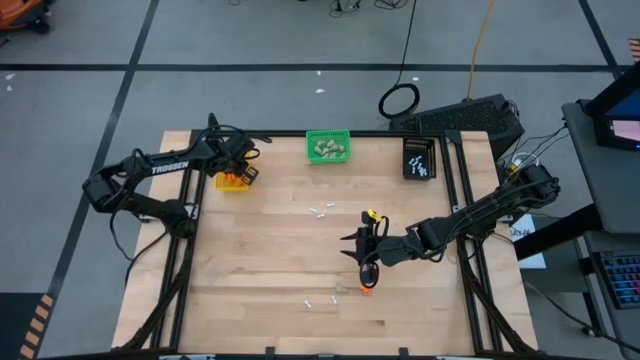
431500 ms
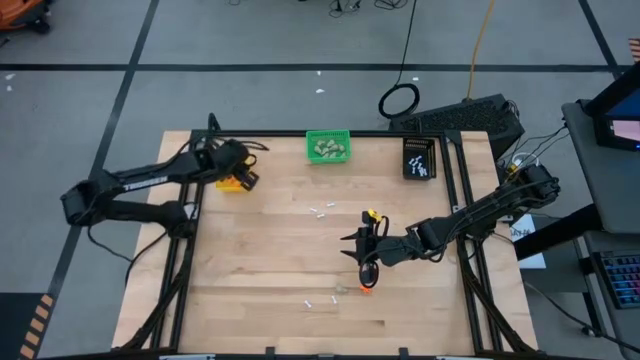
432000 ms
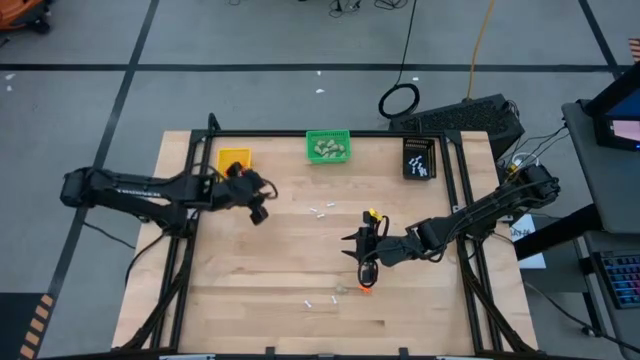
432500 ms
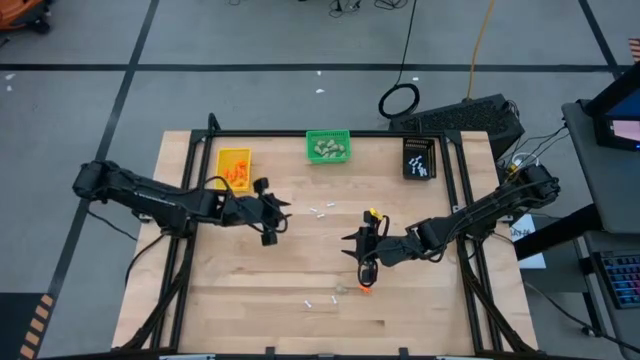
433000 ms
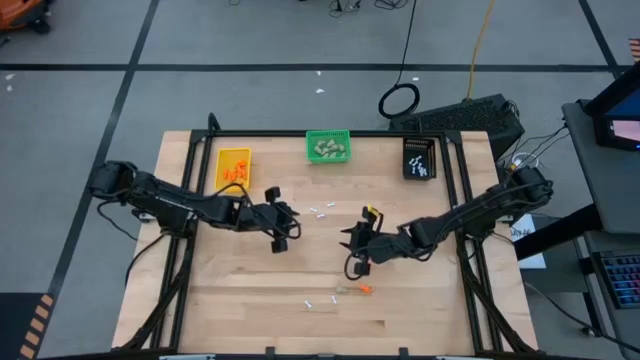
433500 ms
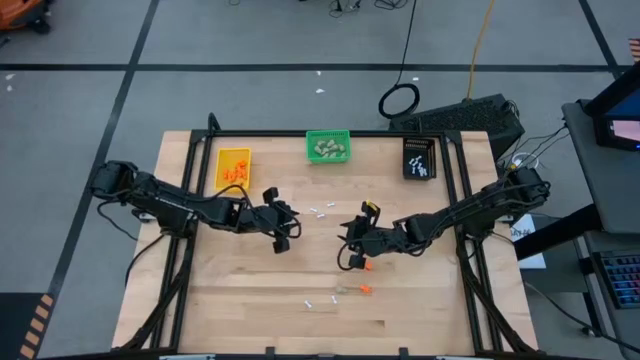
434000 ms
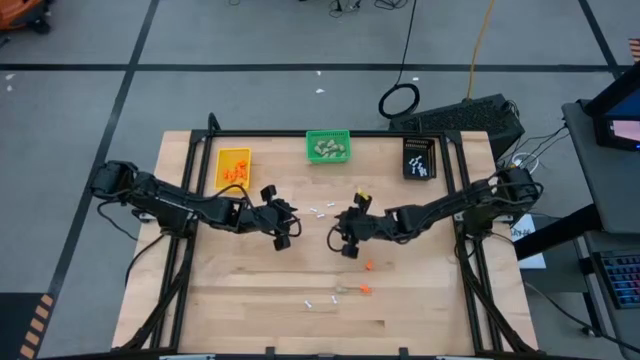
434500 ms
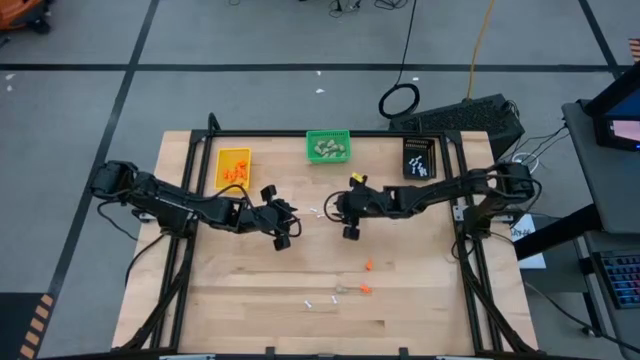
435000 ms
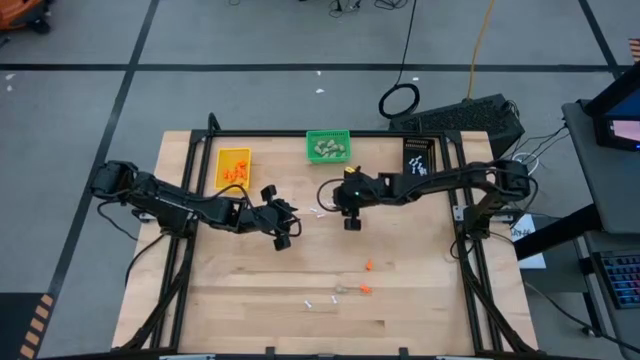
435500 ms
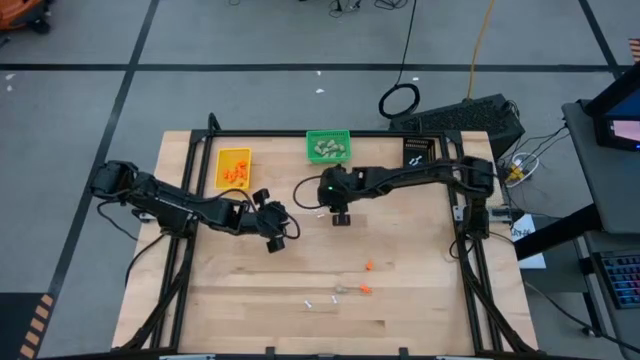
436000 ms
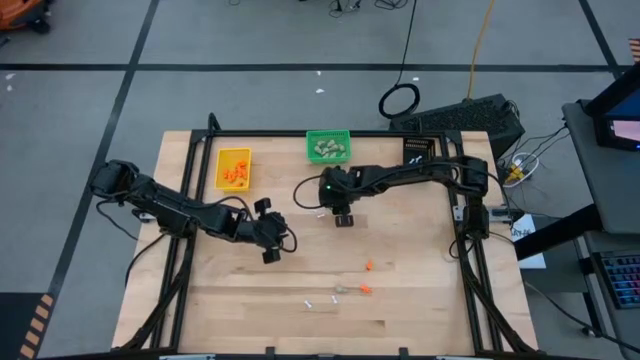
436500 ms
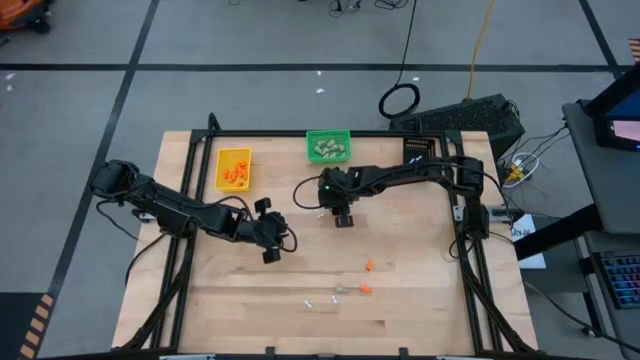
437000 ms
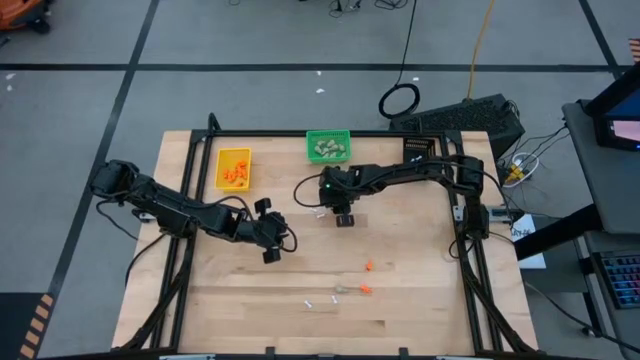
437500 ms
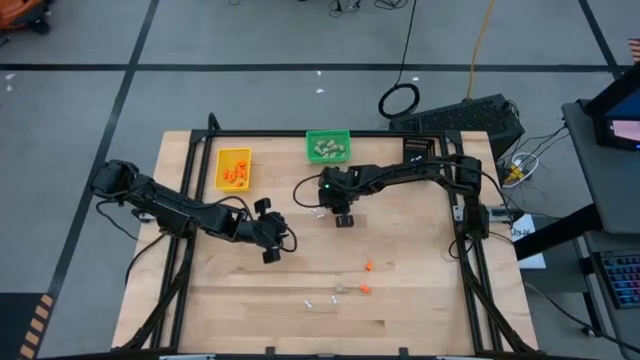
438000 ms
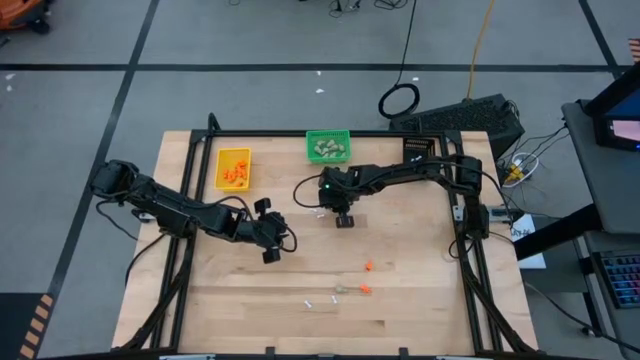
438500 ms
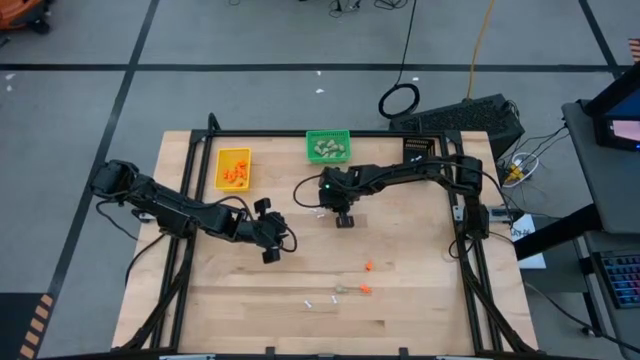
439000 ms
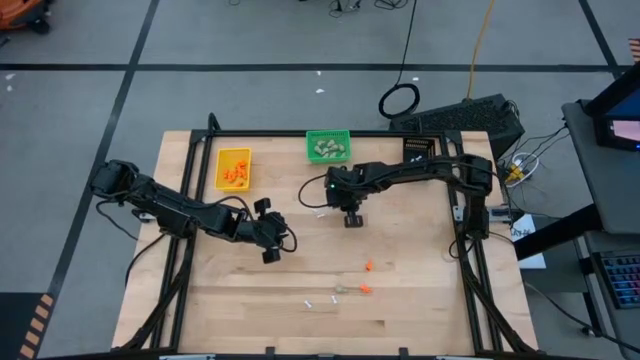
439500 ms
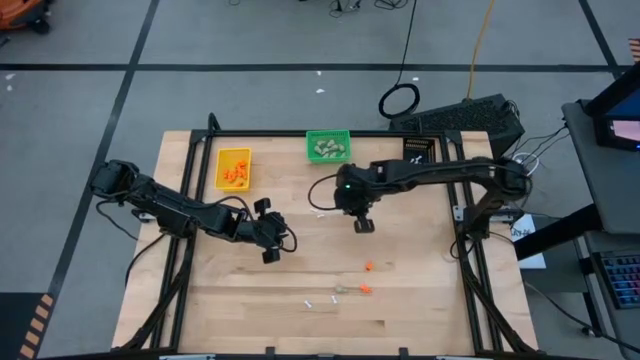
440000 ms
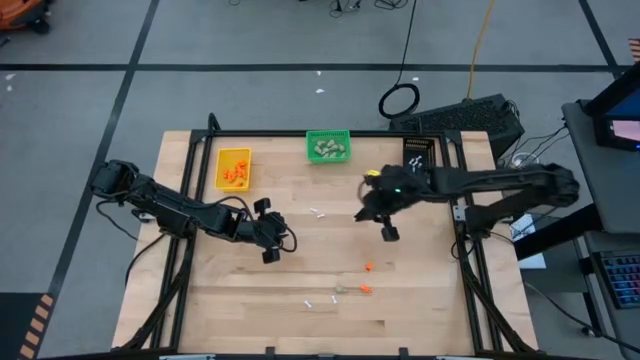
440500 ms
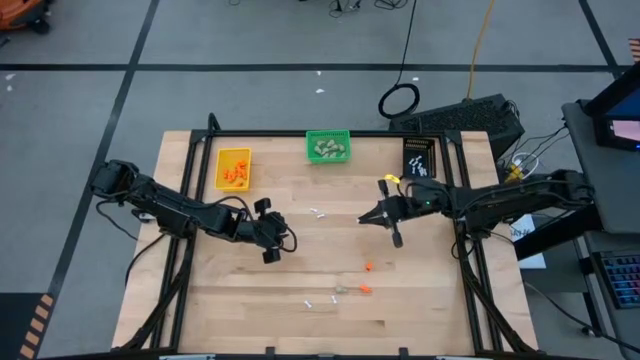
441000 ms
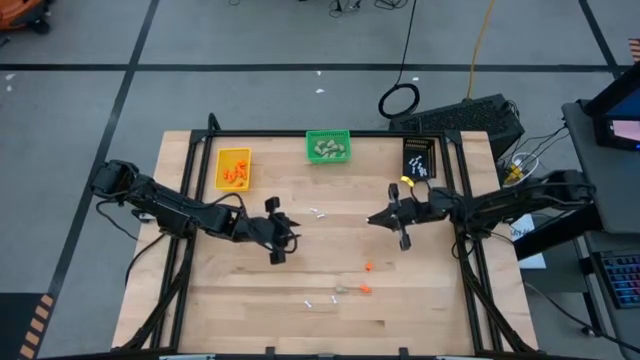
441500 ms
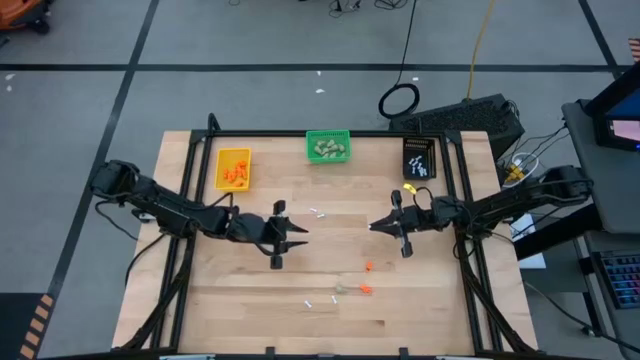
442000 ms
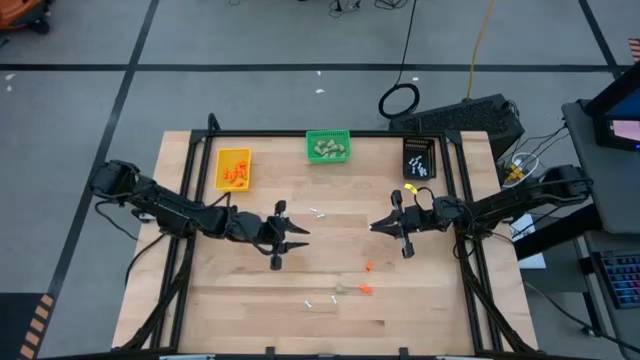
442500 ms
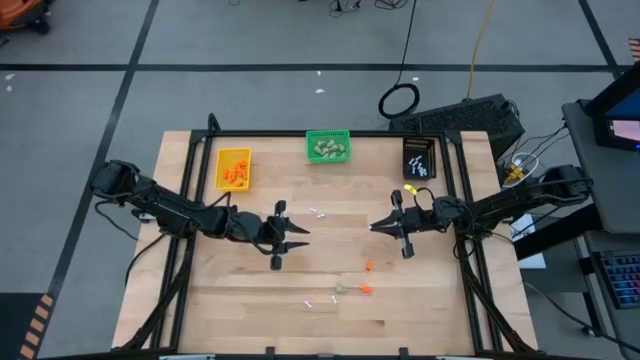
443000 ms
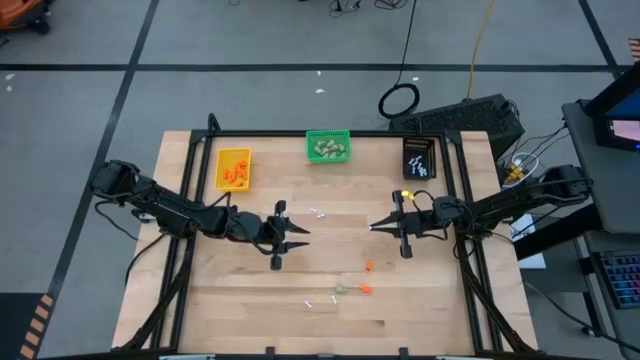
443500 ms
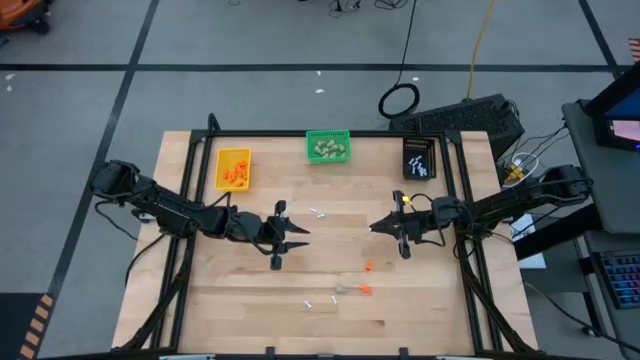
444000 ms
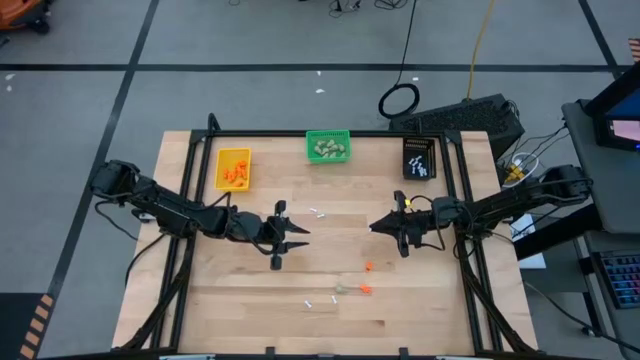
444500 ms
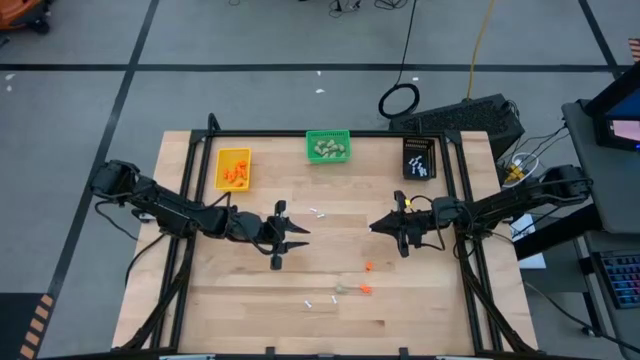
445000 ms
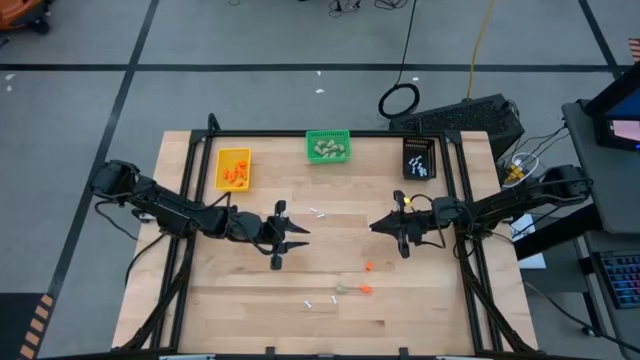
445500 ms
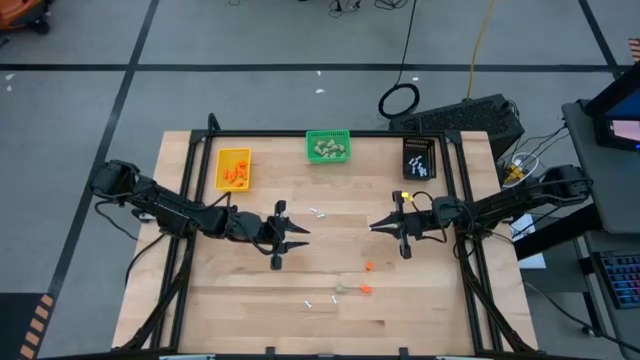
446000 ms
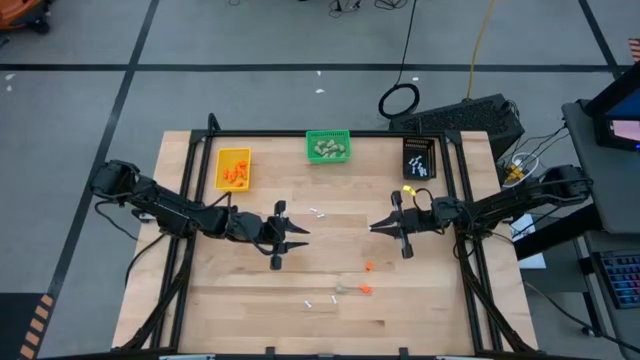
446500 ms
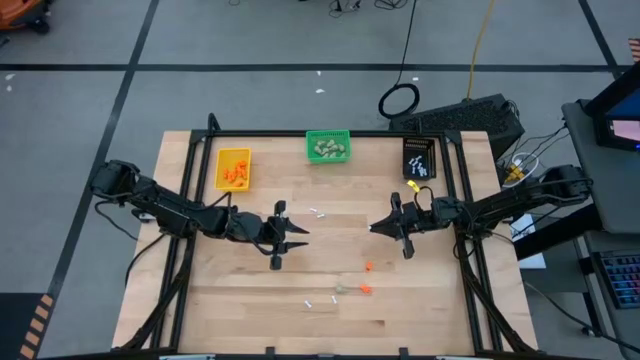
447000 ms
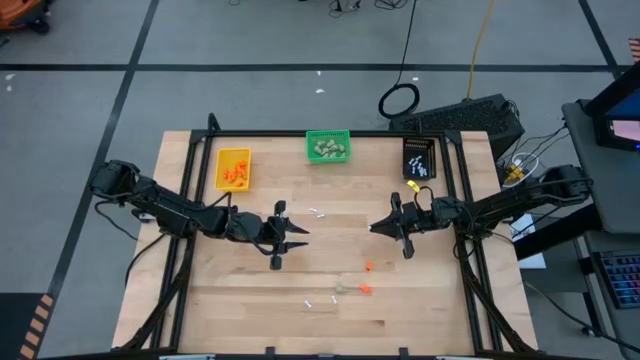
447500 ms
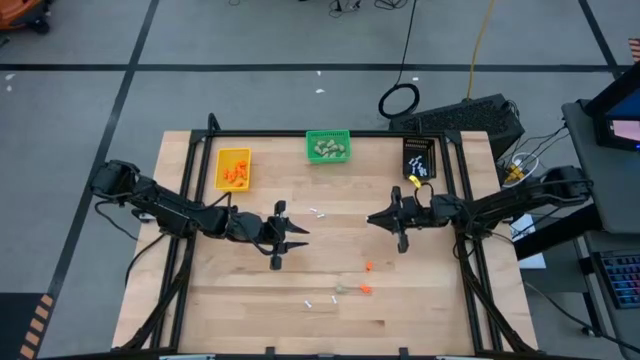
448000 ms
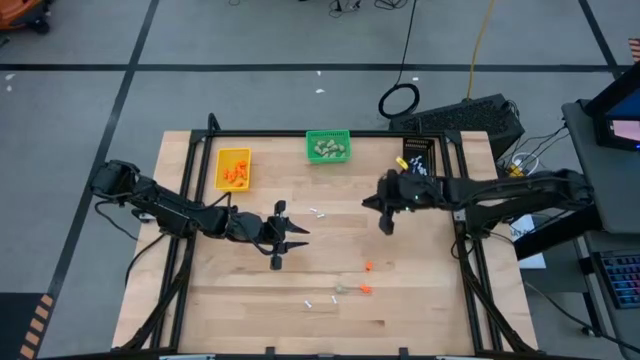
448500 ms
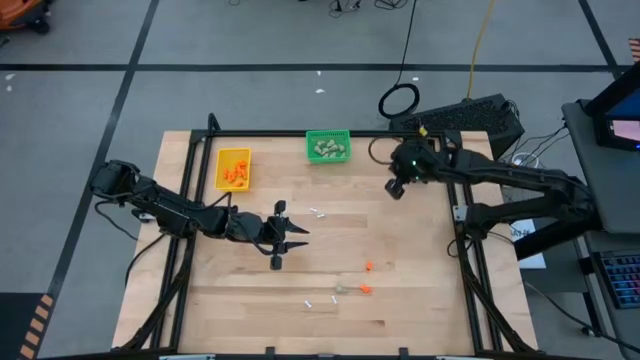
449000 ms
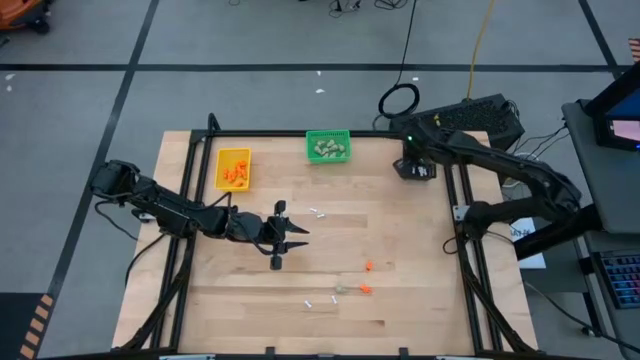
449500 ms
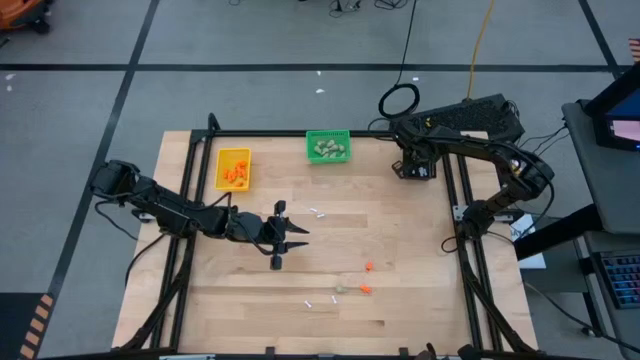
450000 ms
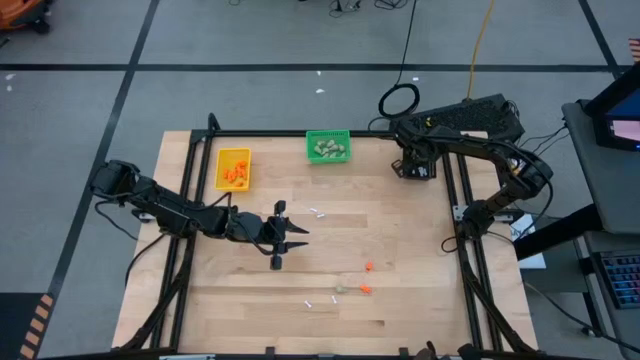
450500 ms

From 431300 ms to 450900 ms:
Task: Sort Halloween decoration
Put the white bone toy into the black bin

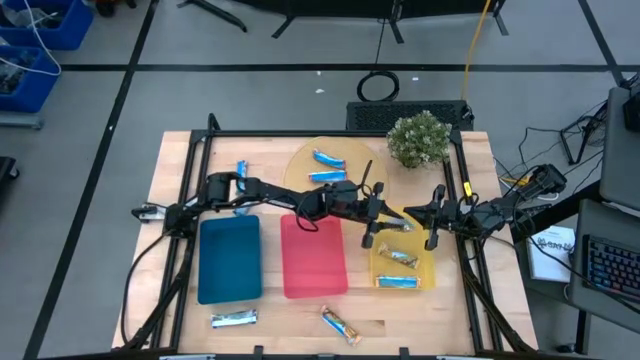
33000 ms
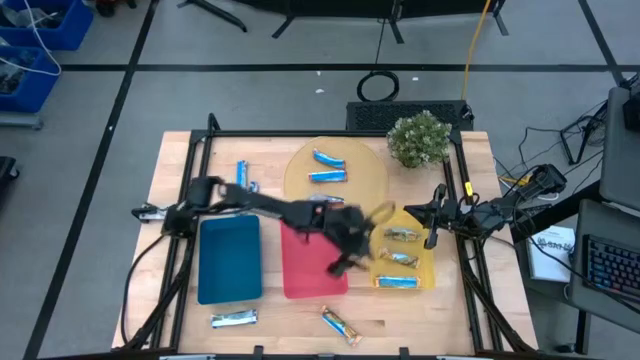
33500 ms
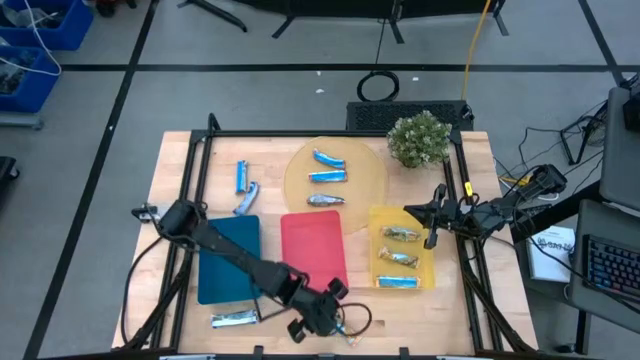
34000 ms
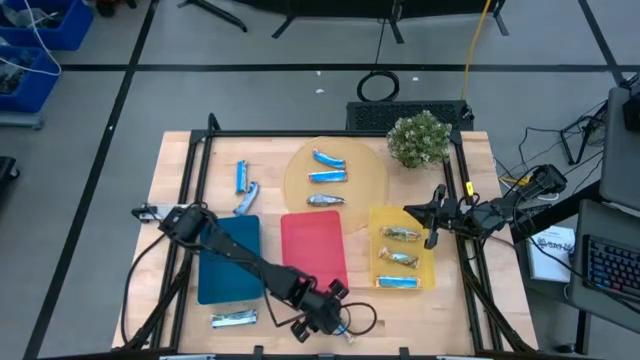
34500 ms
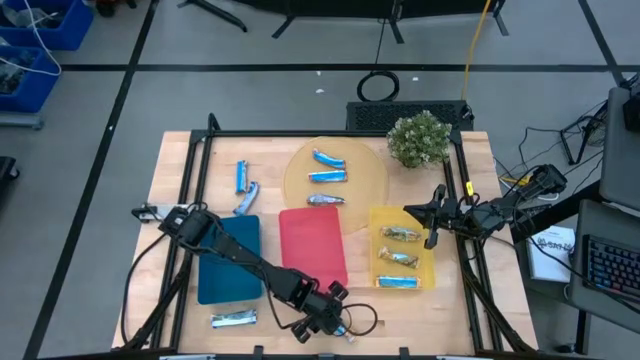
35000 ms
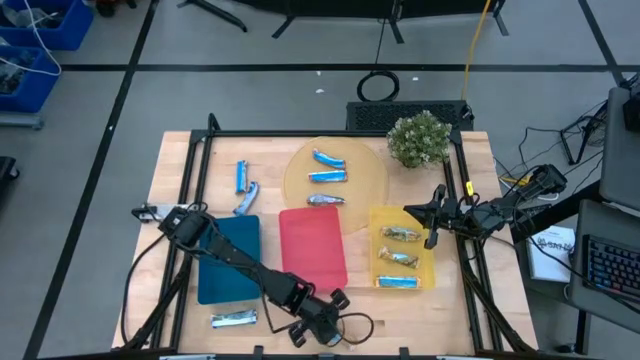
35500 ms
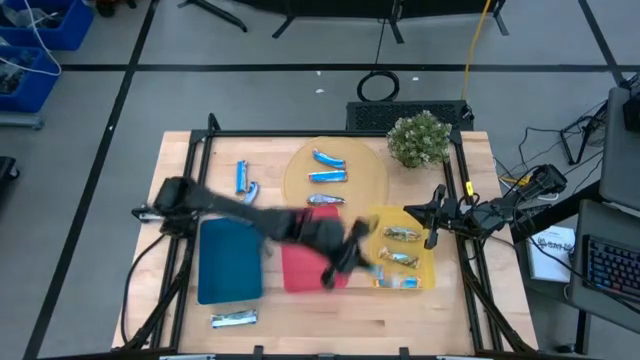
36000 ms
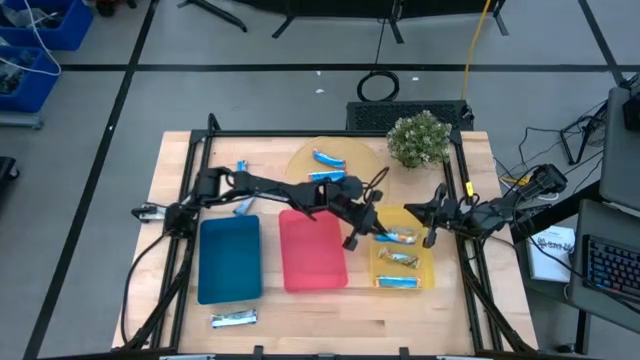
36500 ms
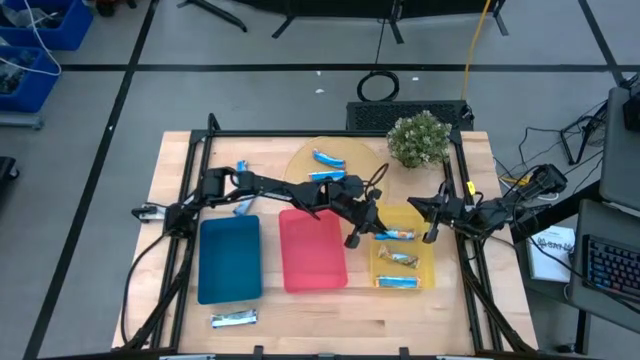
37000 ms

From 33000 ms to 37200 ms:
Task: Pick and place Granola Bars by type
Put the yellow granola bar into the yellow bin
